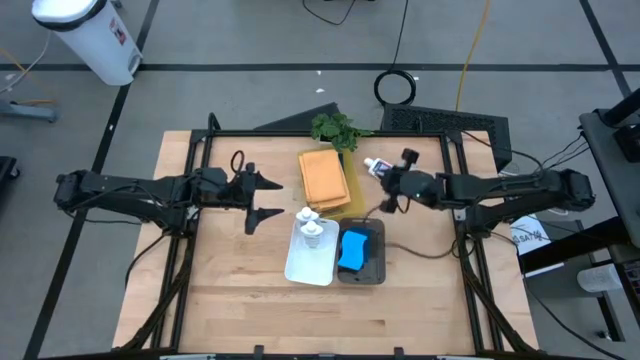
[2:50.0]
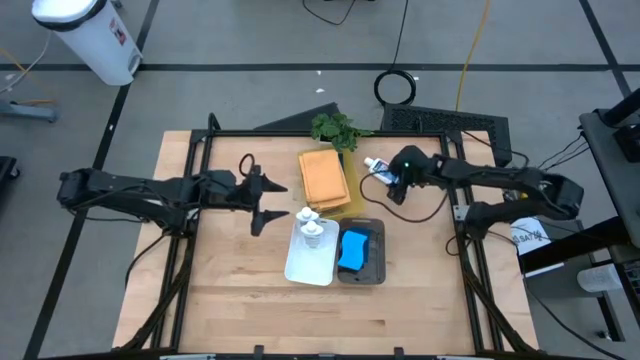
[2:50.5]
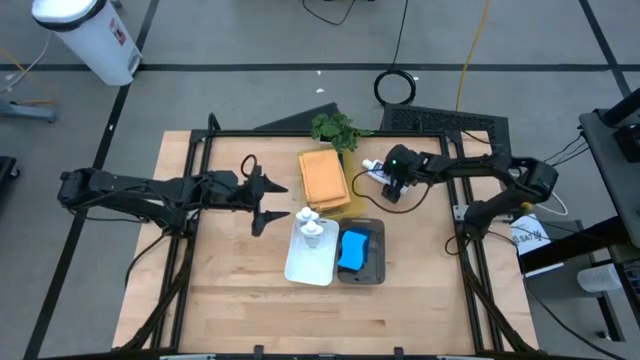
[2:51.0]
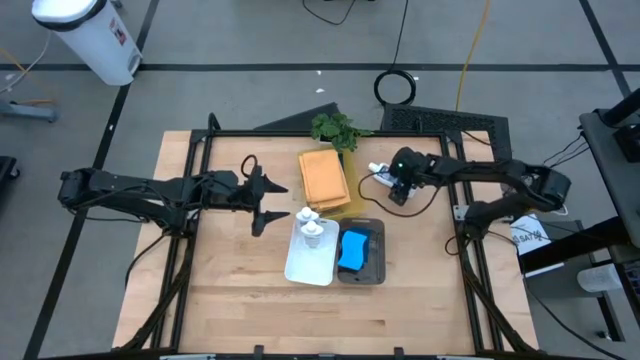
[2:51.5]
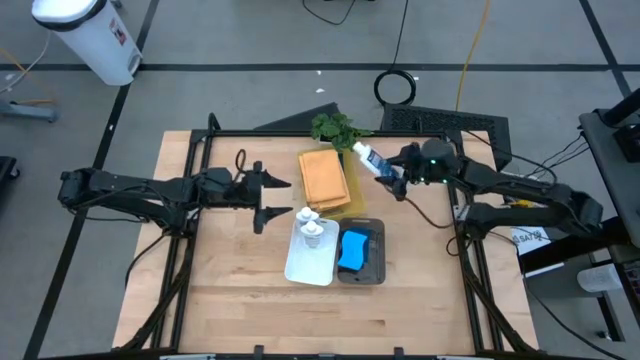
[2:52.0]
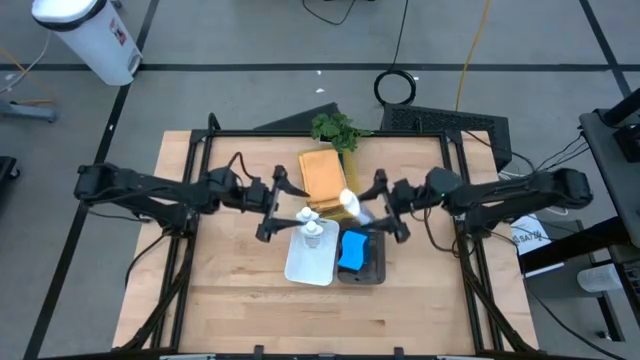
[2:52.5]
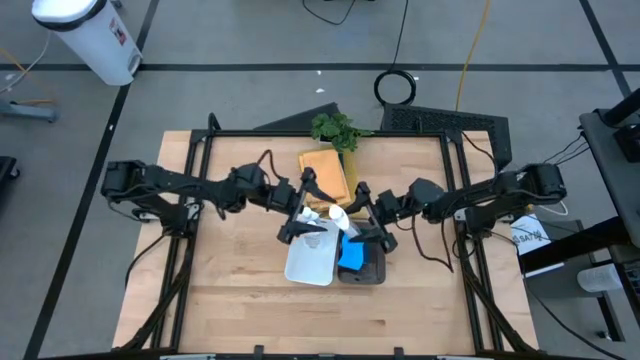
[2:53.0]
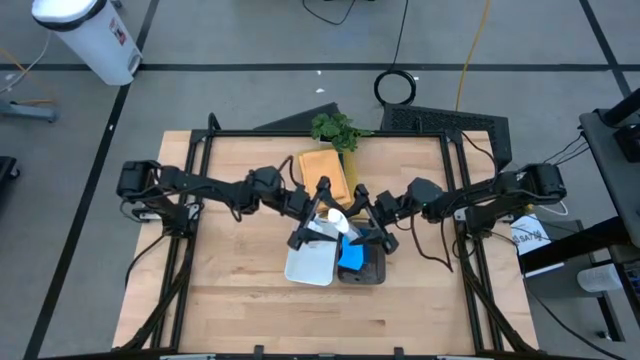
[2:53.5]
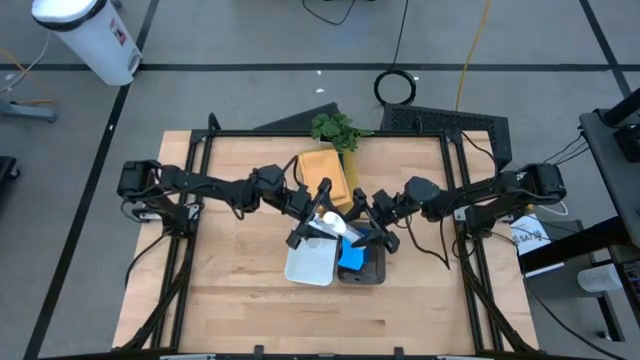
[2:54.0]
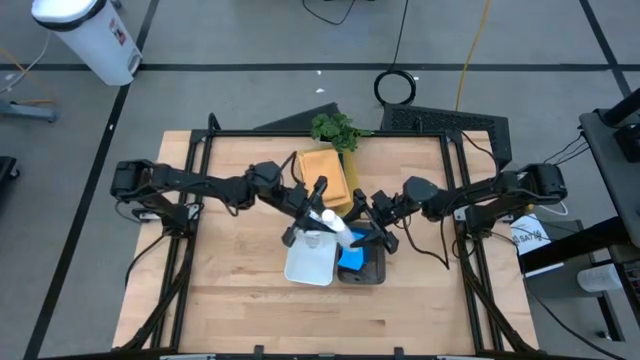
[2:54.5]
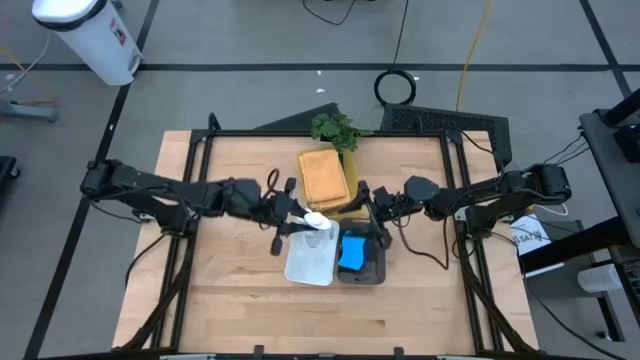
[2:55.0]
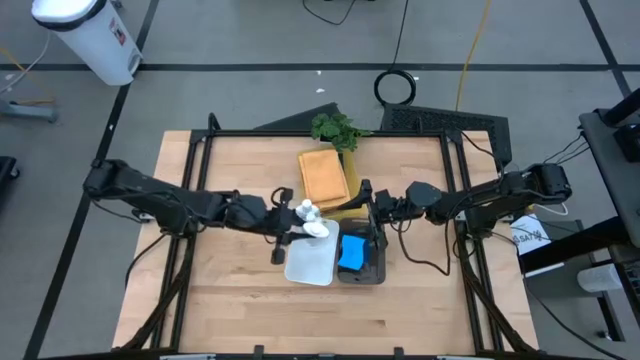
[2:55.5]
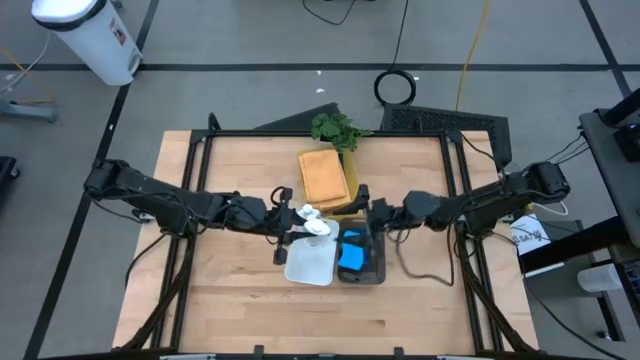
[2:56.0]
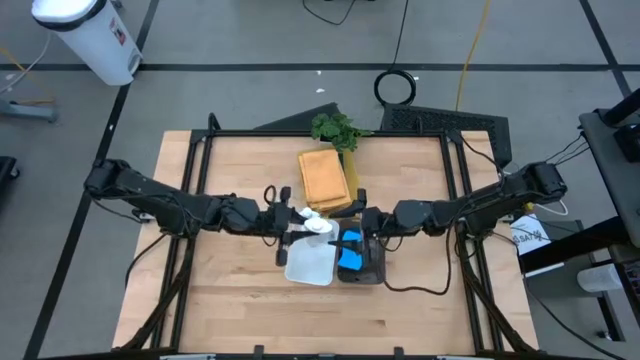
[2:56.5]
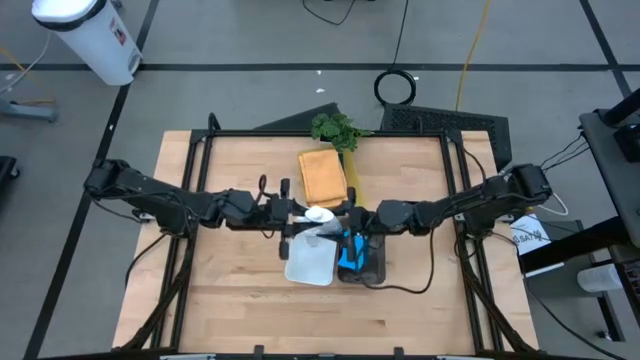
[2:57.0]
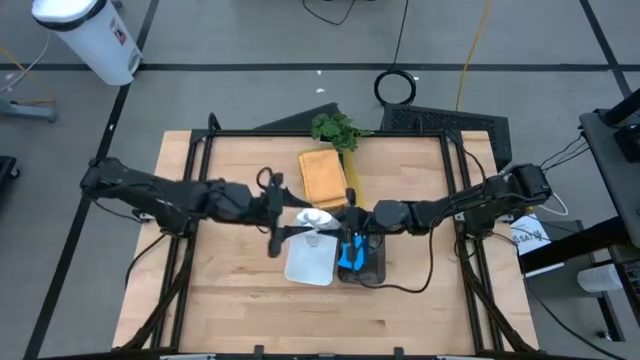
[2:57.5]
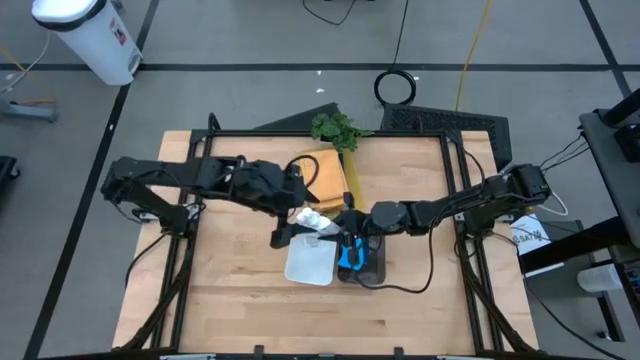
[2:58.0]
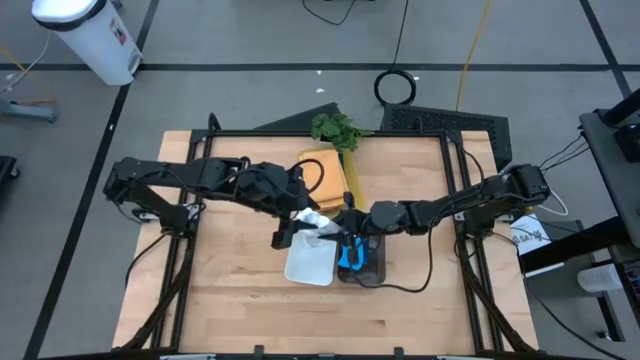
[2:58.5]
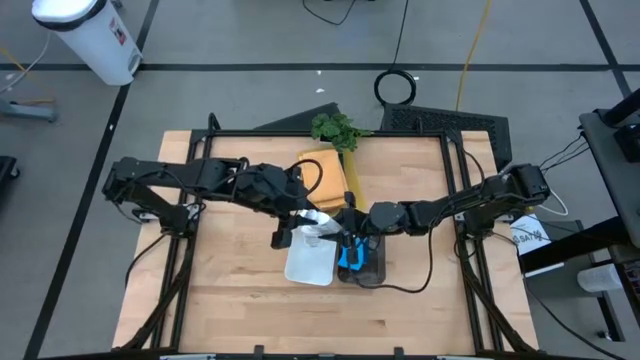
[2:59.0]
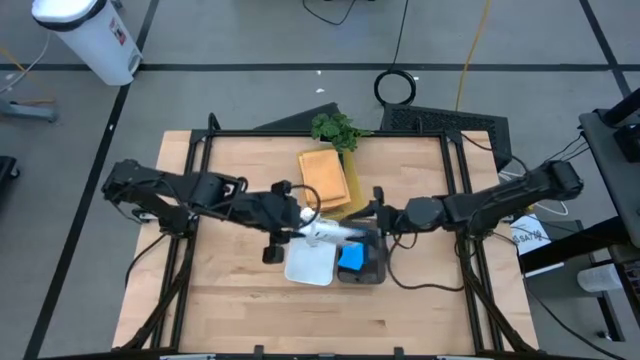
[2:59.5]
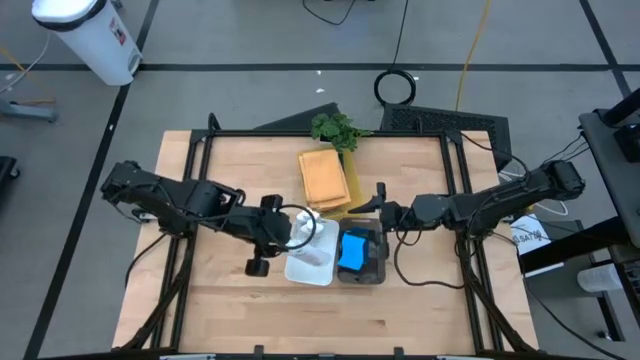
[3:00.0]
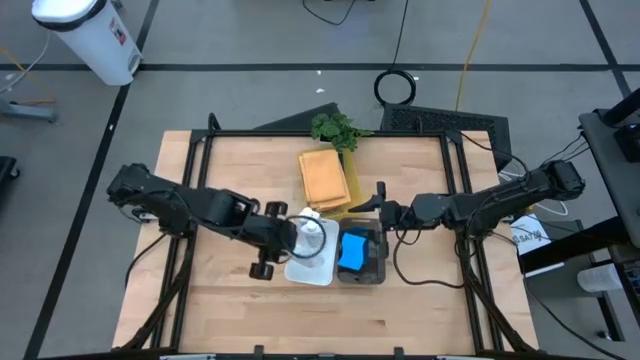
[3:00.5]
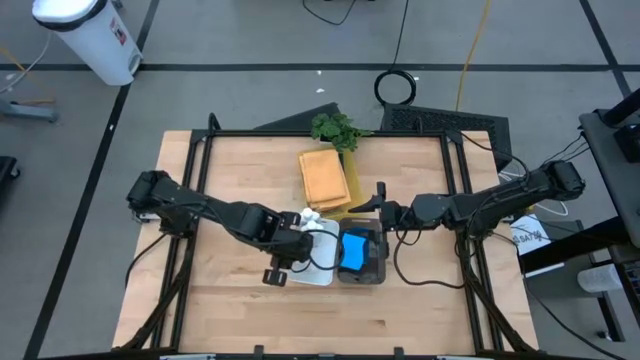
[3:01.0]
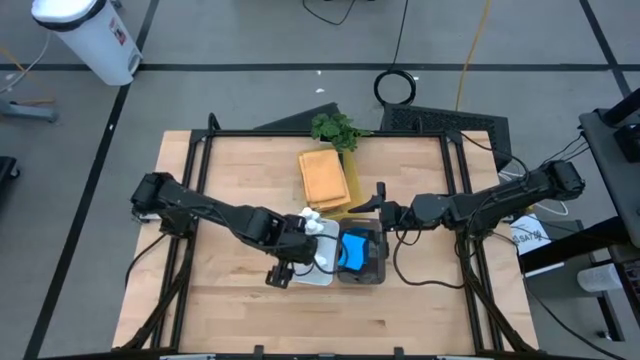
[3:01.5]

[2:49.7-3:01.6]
Task: Pick & Place Kitchen Items
Put the plastic restorer bottle into the white bin

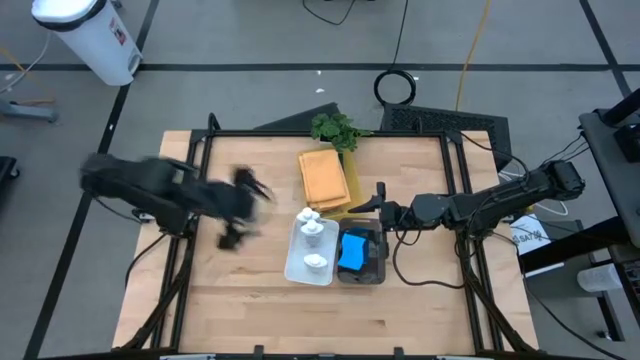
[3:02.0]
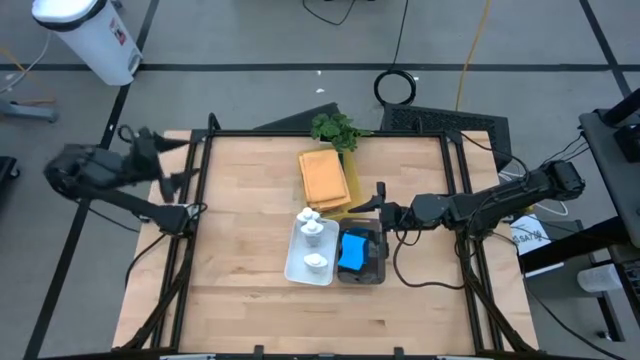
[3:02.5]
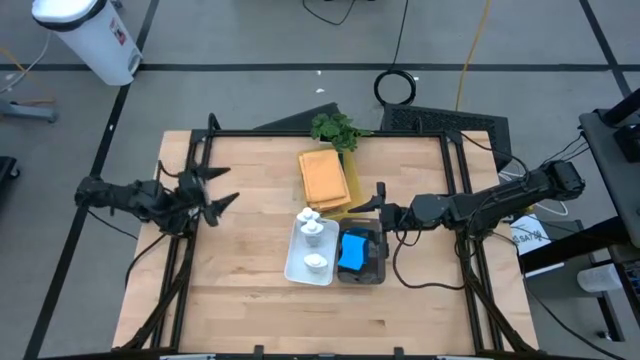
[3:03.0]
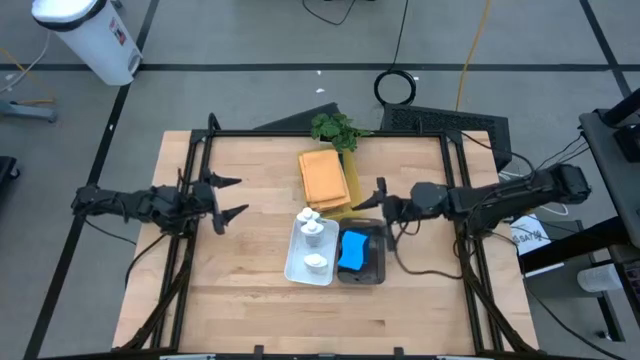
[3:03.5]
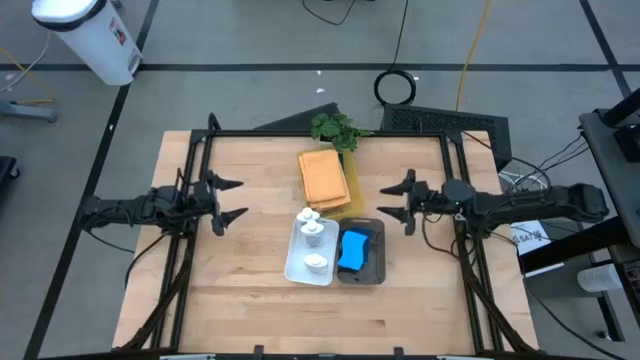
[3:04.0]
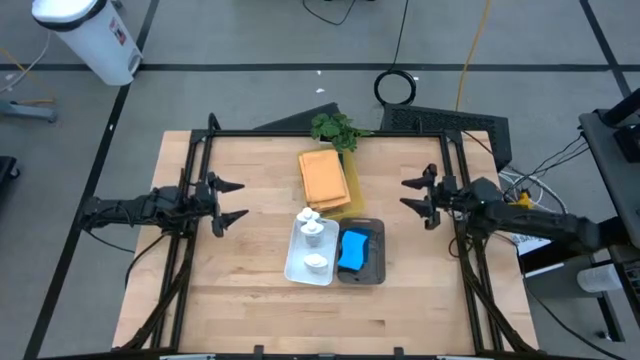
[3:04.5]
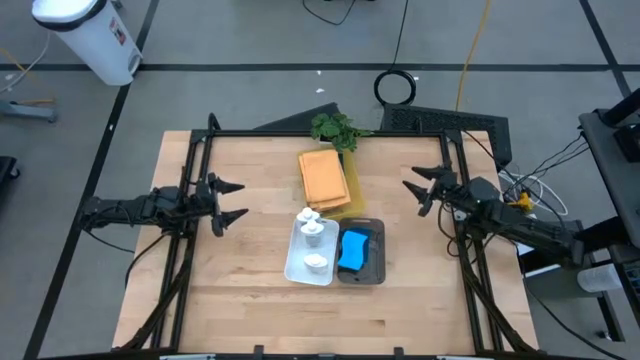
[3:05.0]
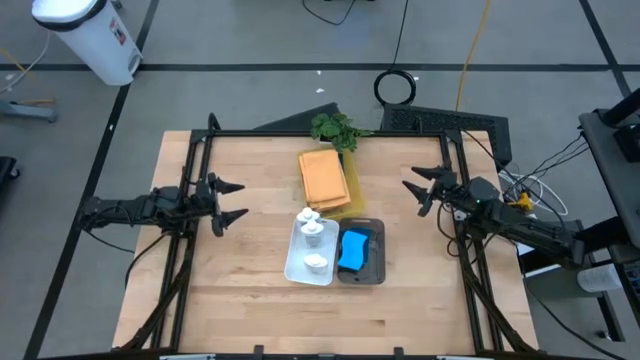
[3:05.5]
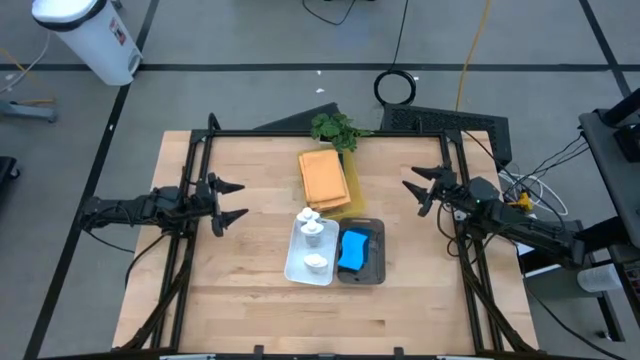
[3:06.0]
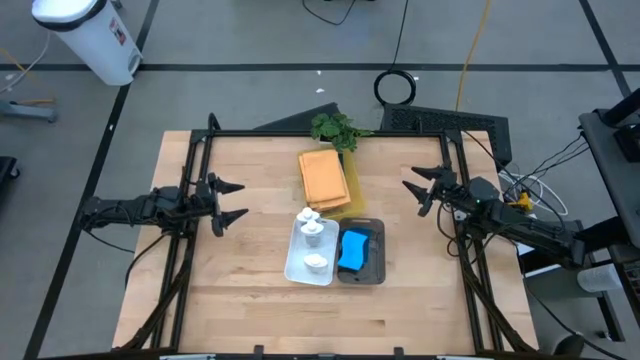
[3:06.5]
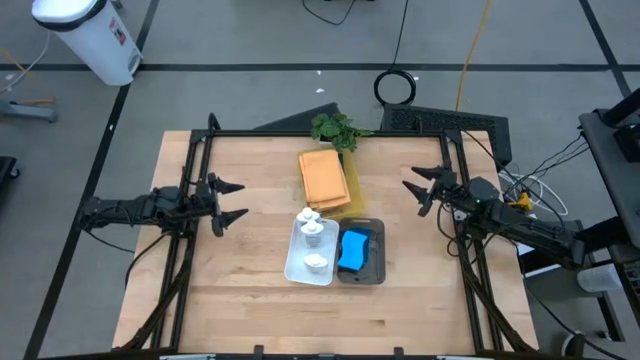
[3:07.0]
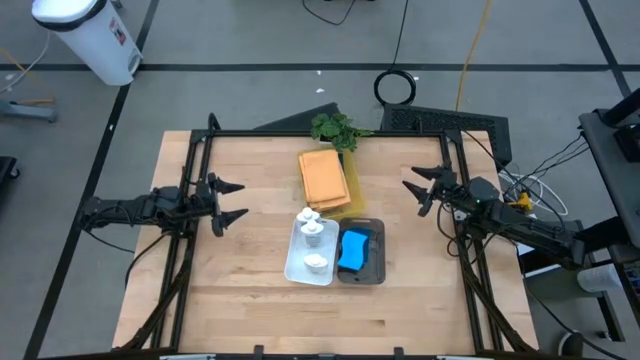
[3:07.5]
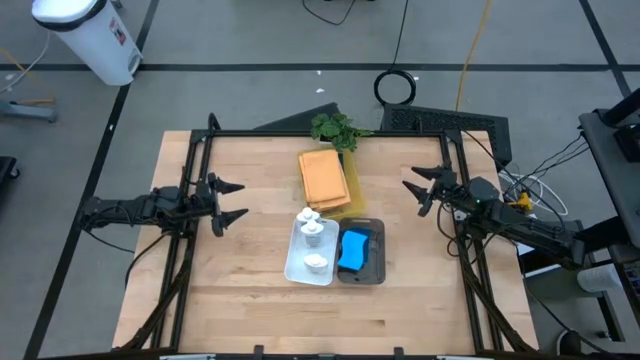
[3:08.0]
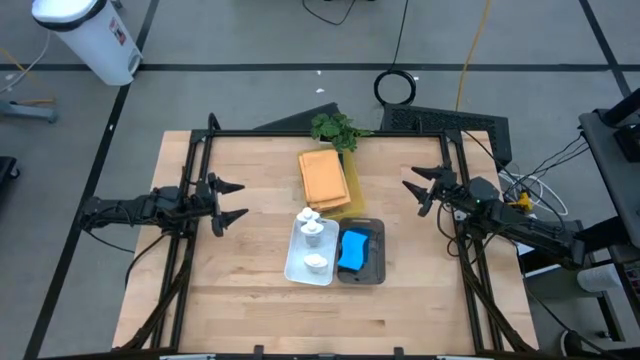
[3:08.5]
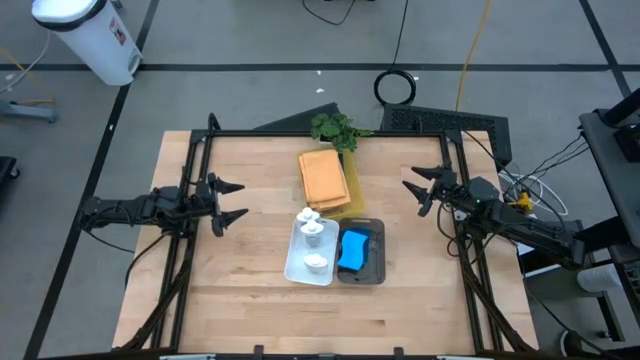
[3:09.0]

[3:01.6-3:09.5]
Return to Home Position

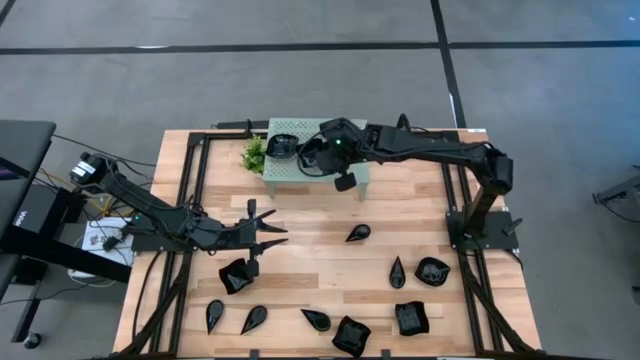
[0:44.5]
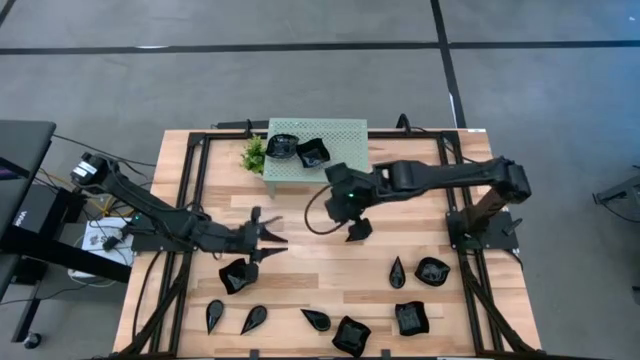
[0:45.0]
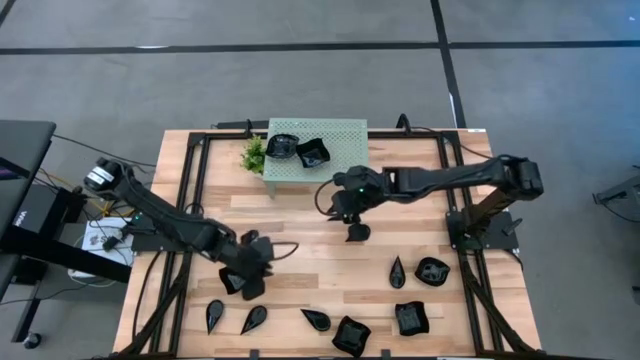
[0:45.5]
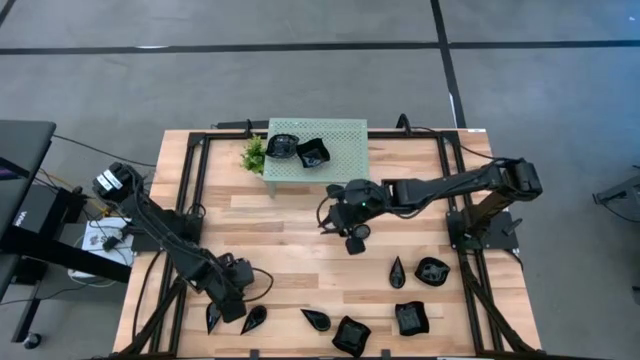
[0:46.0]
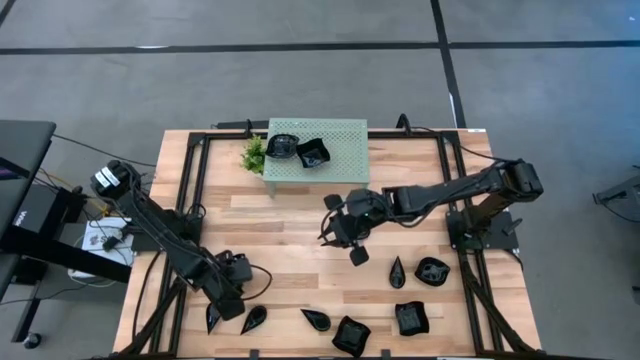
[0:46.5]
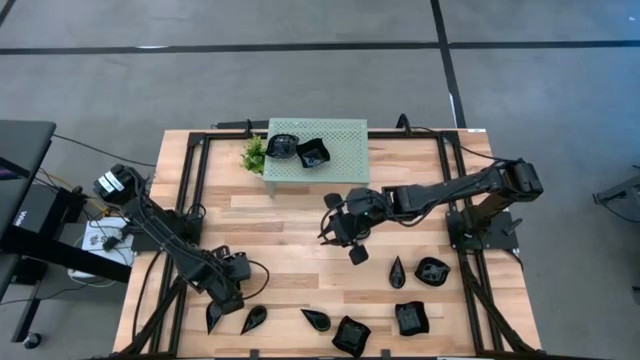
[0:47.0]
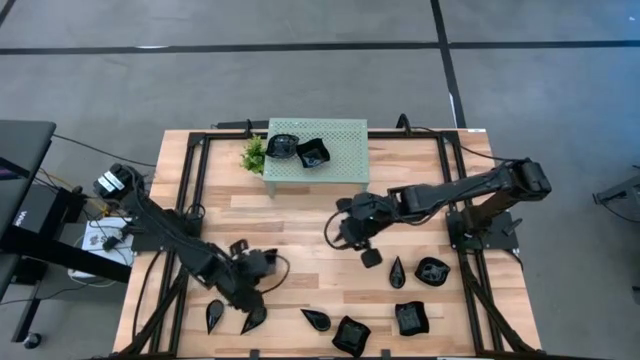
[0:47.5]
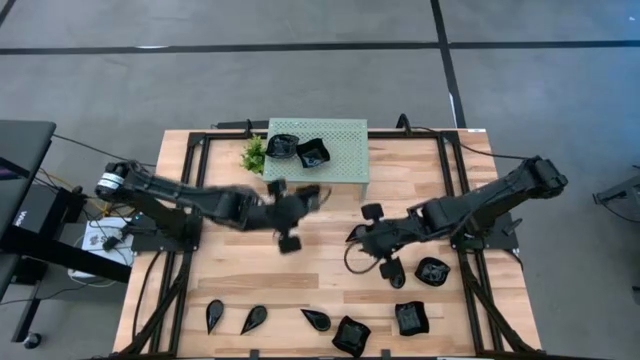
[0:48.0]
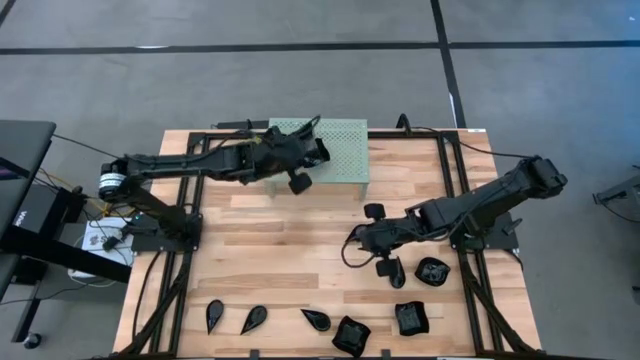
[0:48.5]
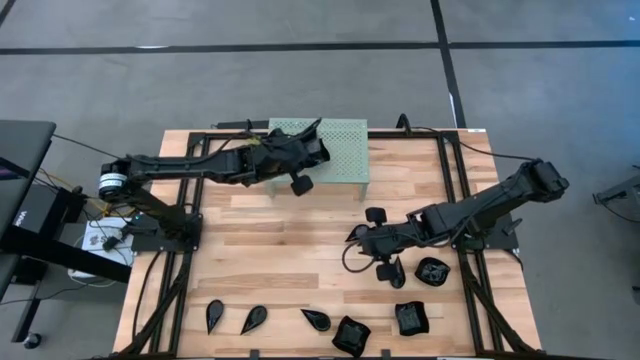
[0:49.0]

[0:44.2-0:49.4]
Task: Pick & Place Mini shaped plates
Stack the distorted square plate on top of the other distorted square plates on the shelf
